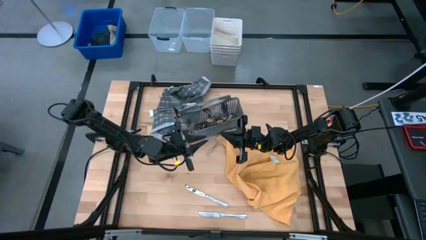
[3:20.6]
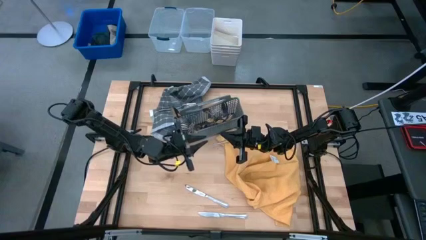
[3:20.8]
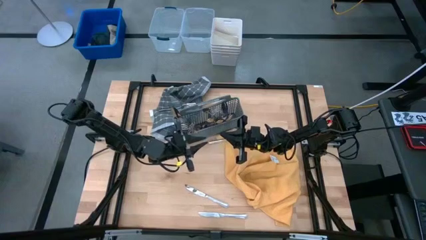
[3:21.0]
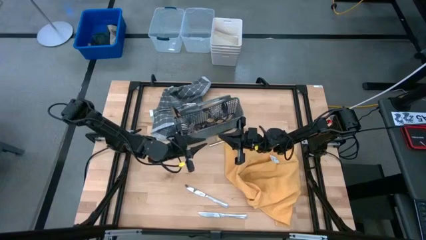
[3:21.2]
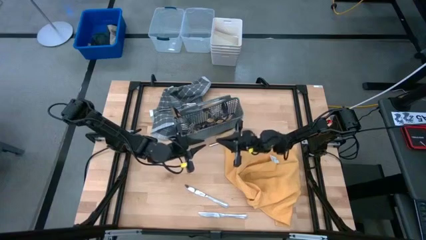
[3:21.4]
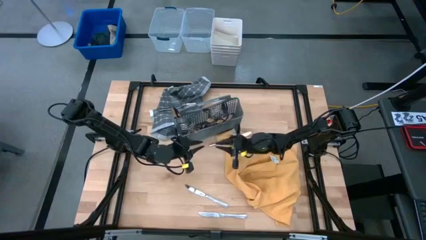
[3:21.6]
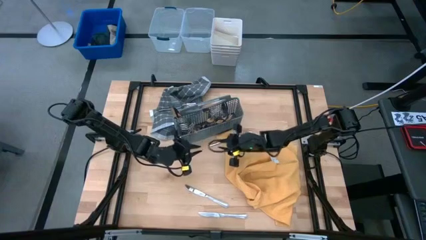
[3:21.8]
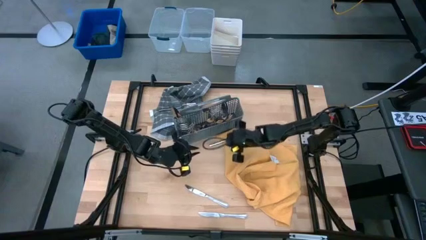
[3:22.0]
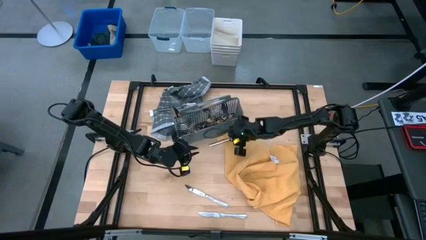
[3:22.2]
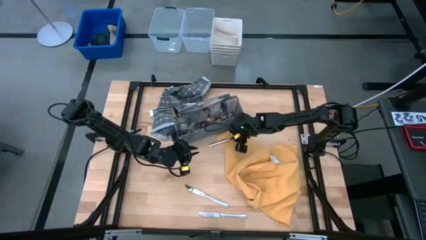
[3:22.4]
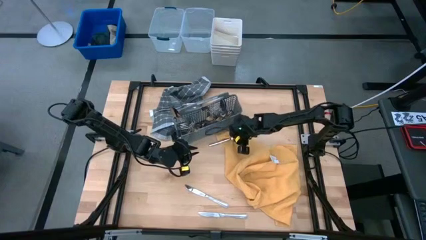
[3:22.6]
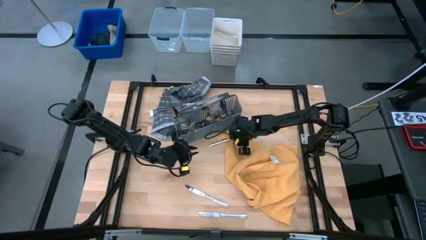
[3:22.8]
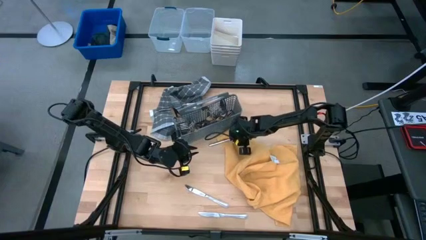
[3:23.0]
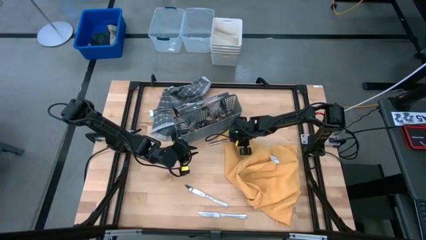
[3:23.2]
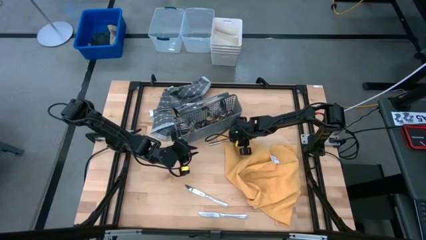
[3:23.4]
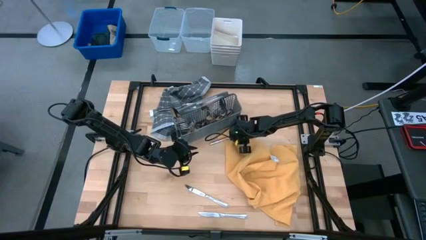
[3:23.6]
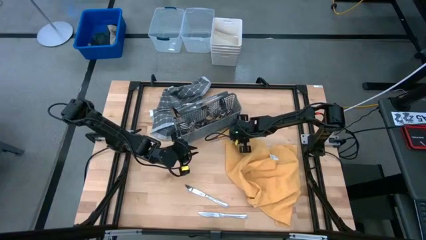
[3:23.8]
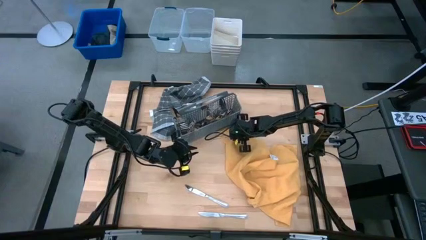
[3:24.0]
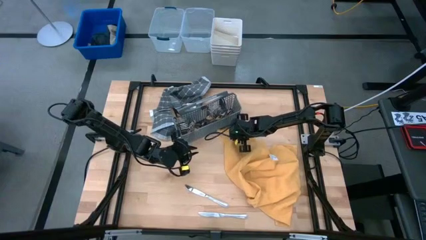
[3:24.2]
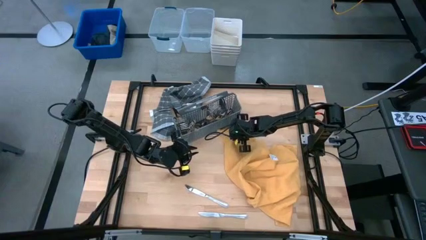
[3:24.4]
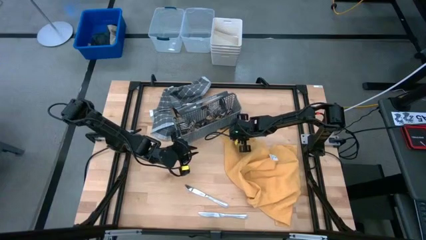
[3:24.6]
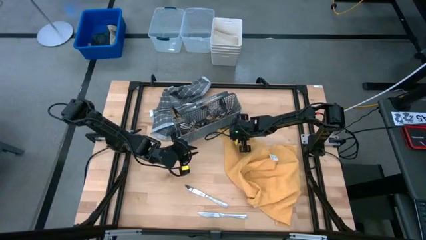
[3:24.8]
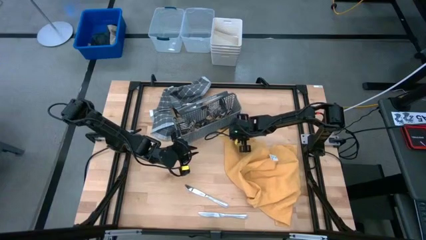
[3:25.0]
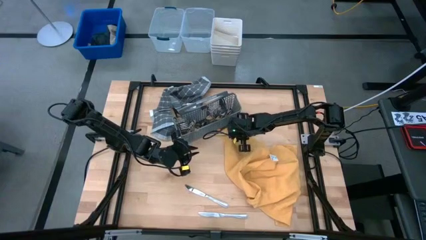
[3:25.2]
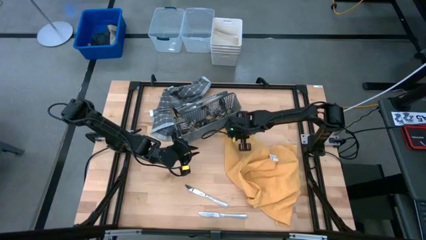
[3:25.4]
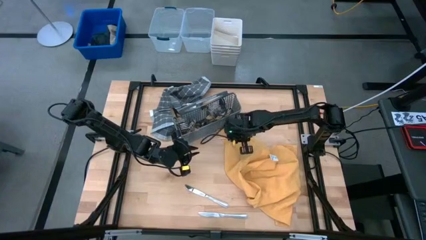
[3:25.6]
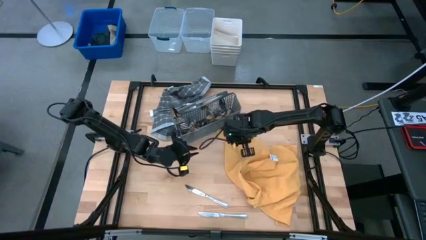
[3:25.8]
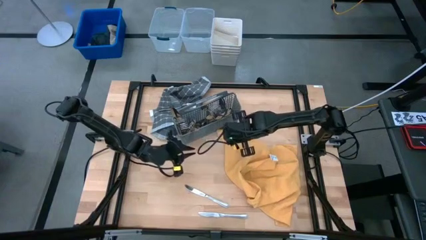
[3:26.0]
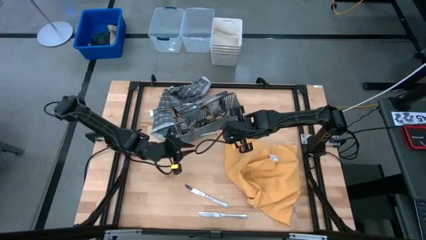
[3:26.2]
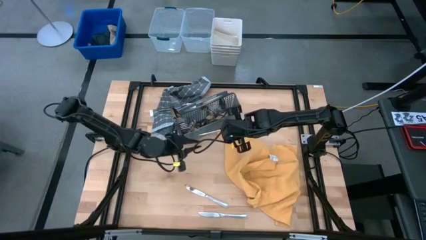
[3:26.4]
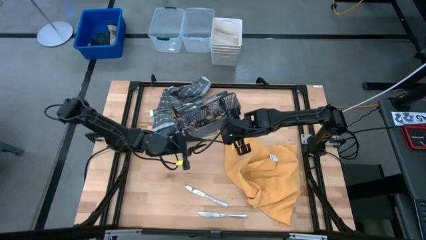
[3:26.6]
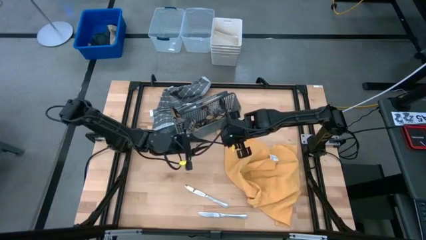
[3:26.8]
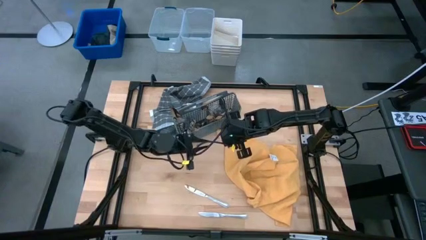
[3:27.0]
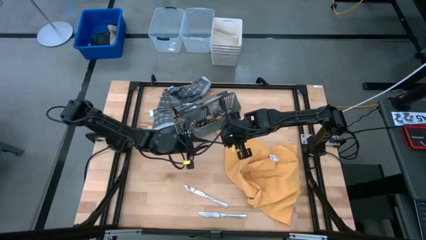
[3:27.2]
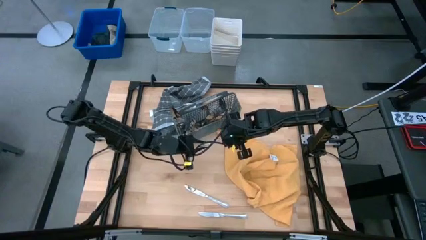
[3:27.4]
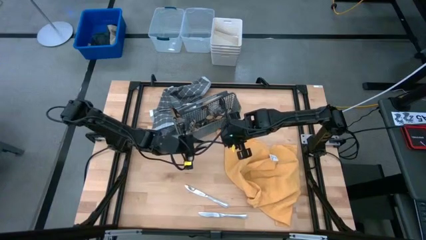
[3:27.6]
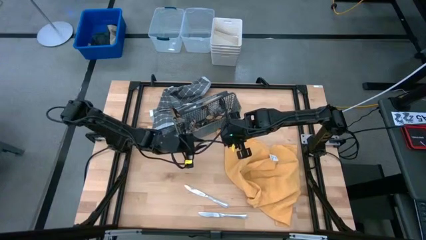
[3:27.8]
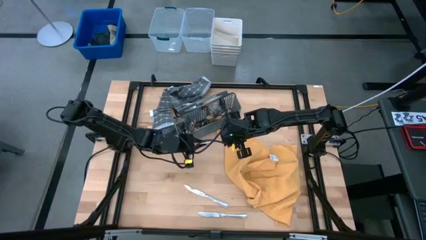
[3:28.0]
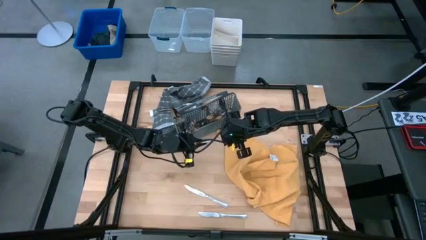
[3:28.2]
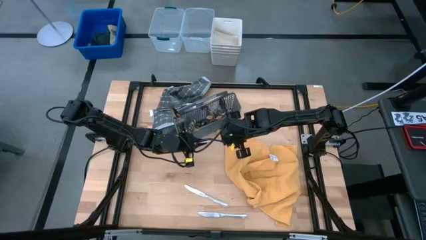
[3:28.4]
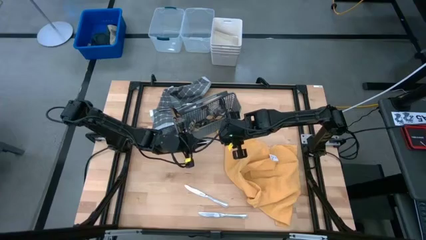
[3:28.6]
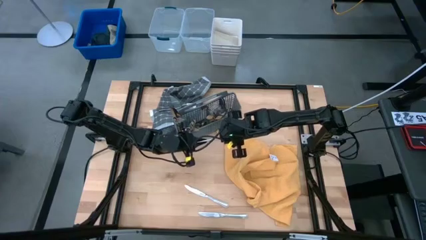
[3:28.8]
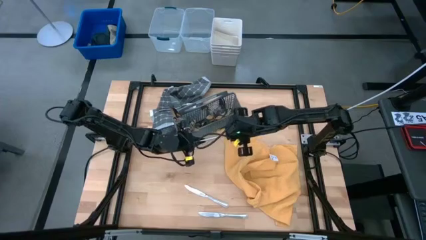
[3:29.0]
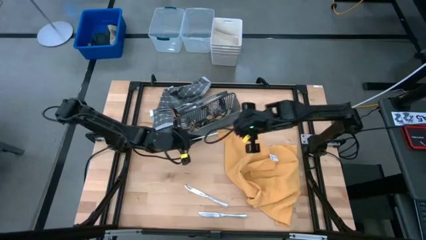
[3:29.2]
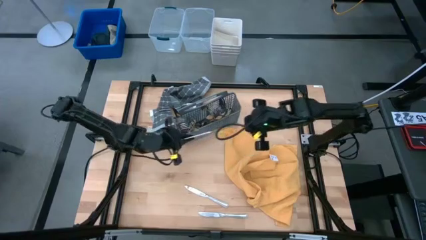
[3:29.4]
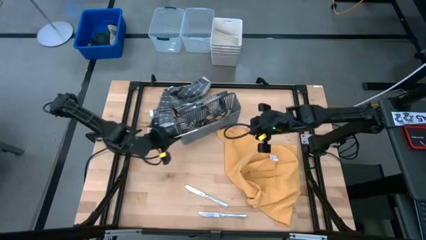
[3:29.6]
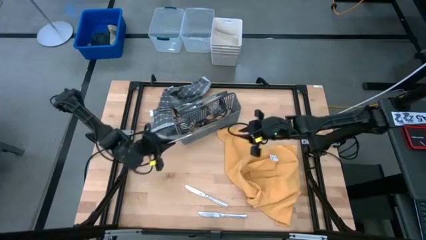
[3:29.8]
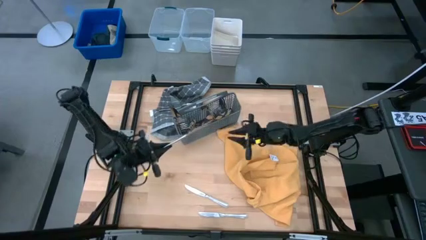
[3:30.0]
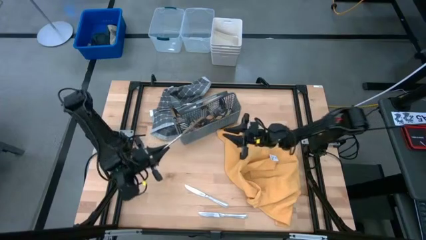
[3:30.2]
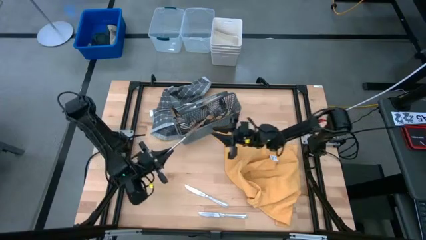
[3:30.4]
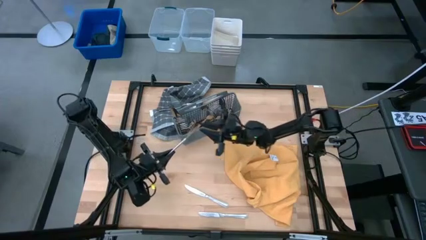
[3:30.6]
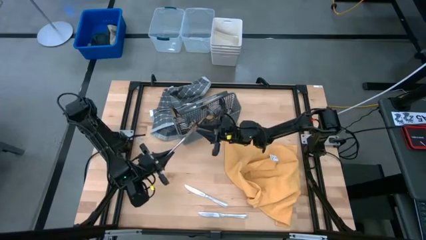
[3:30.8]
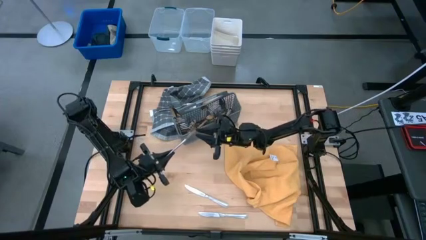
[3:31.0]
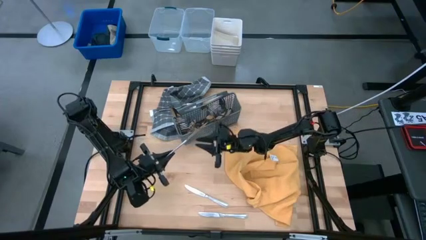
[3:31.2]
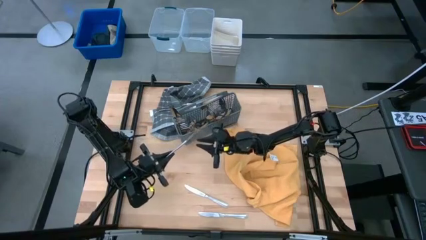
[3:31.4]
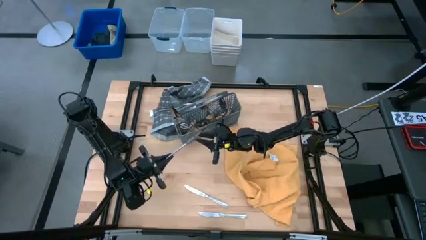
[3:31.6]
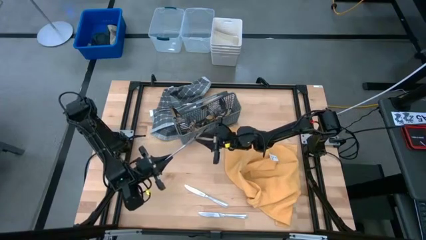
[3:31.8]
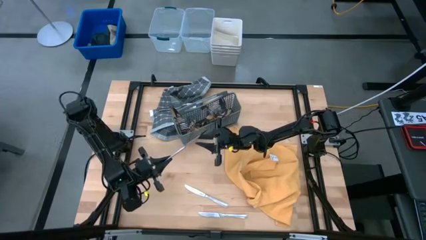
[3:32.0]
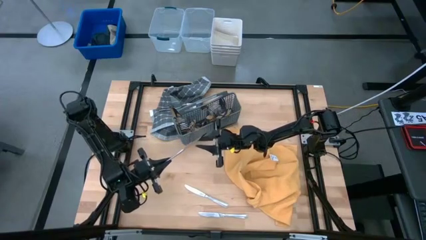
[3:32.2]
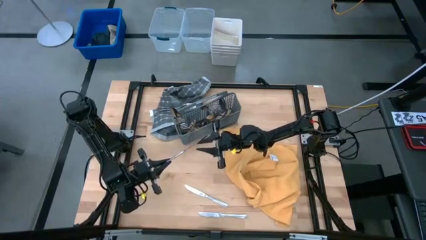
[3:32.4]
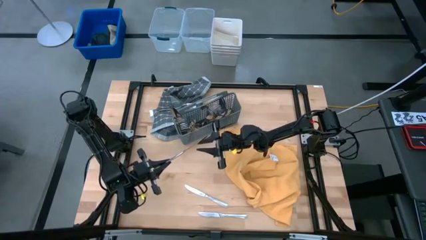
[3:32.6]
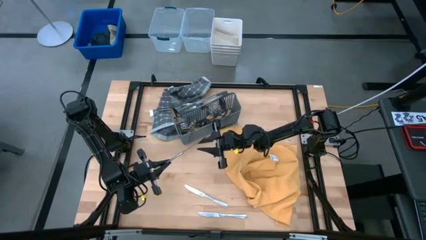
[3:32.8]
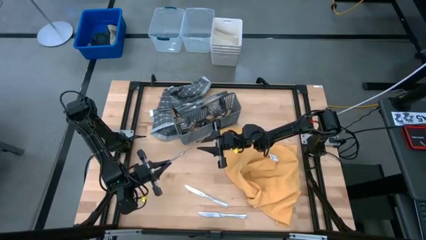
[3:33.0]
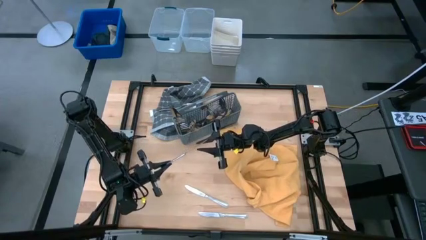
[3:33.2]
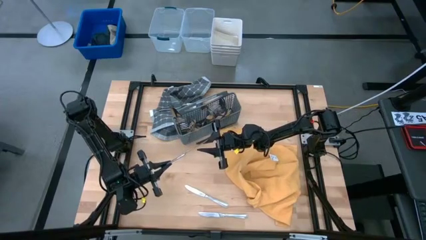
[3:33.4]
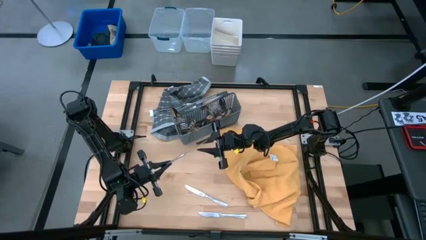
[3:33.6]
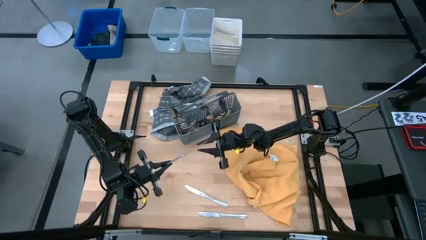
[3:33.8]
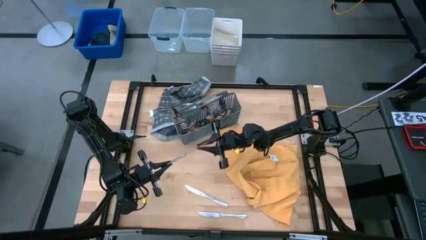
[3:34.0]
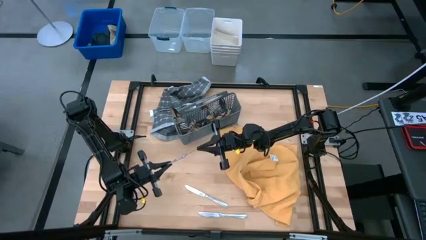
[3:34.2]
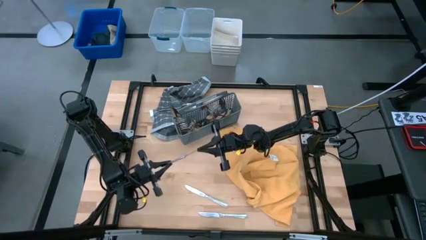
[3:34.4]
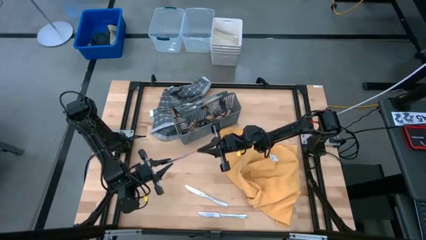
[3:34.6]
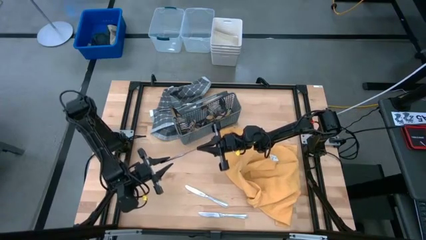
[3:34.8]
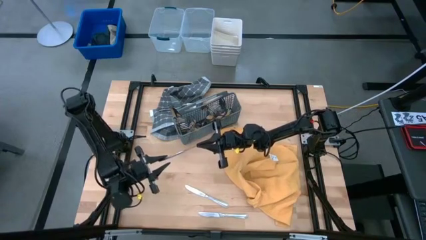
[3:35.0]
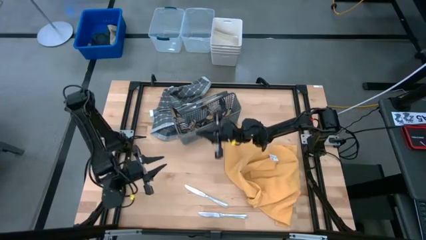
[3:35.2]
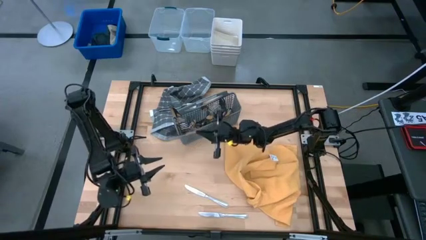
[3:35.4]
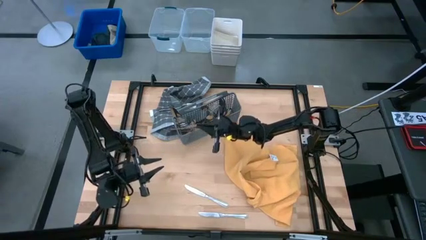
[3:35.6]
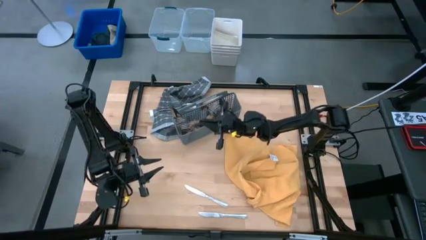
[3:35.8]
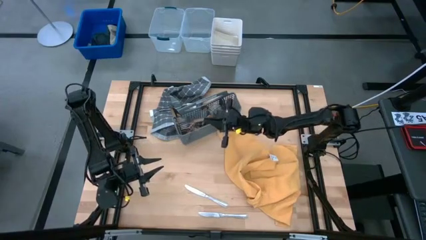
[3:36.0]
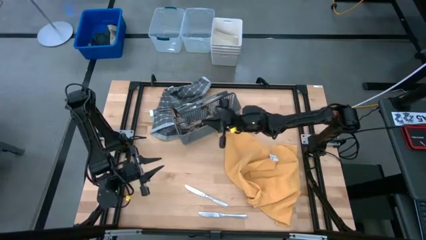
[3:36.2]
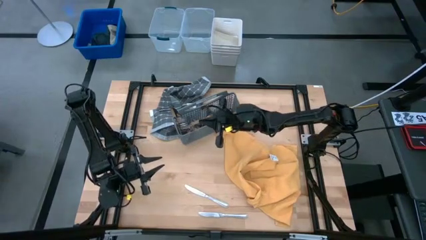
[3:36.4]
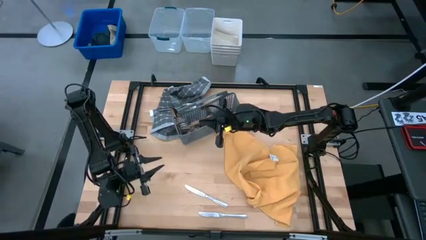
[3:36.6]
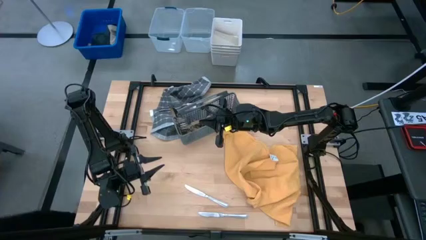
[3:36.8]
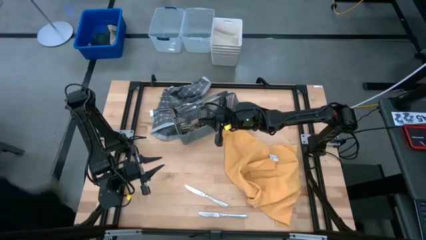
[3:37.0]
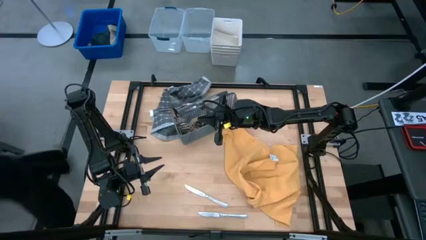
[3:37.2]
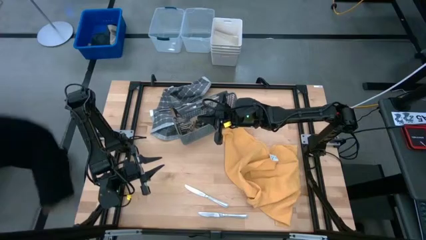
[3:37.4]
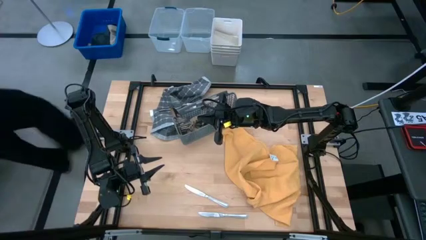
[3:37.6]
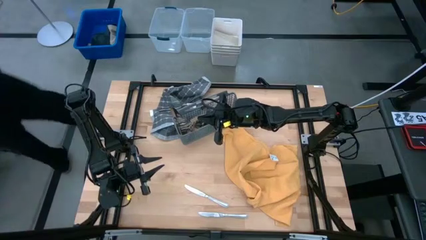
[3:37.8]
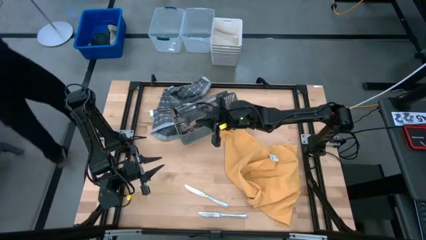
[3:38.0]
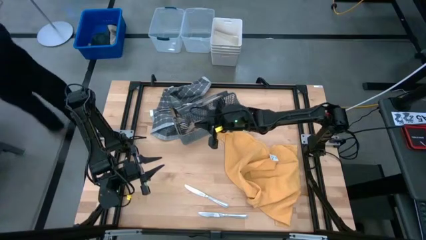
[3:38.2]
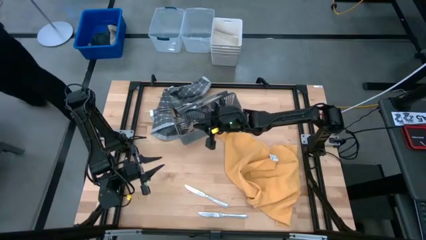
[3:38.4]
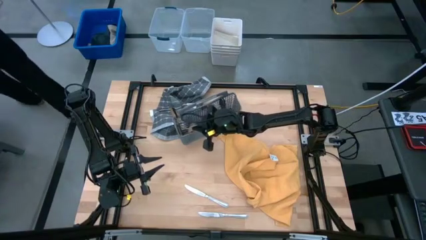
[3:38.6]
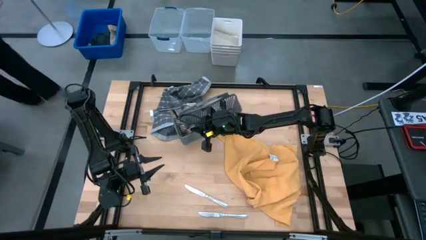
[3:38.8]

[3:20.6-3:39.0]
Task: Sort silverware
Put the silver knife into the gray silverware basket
